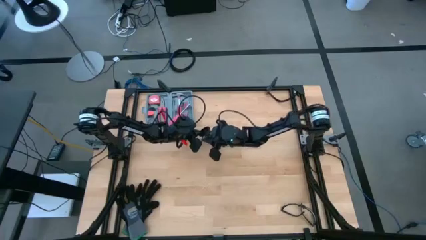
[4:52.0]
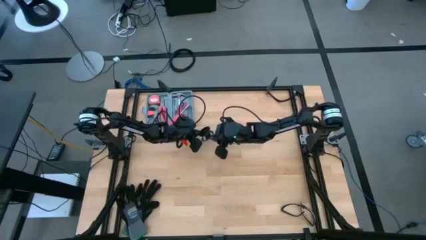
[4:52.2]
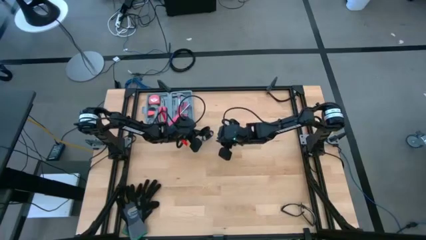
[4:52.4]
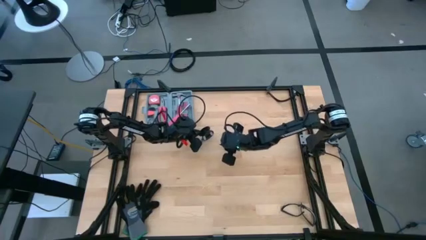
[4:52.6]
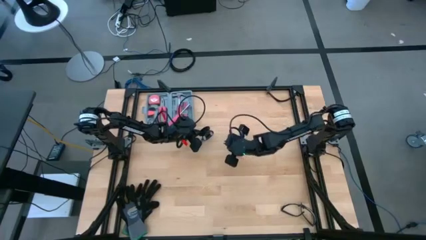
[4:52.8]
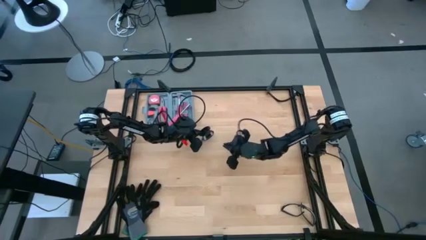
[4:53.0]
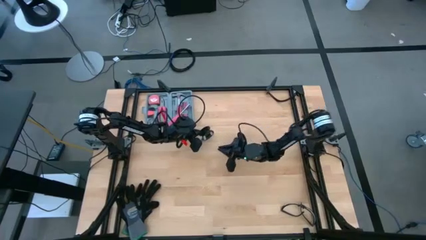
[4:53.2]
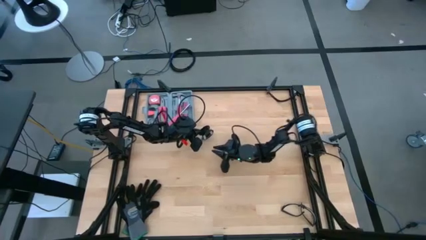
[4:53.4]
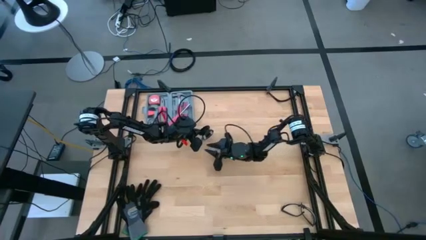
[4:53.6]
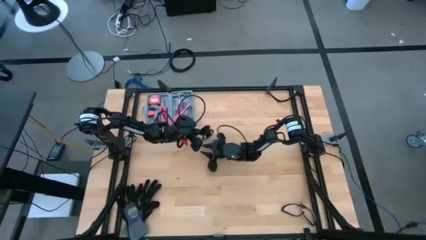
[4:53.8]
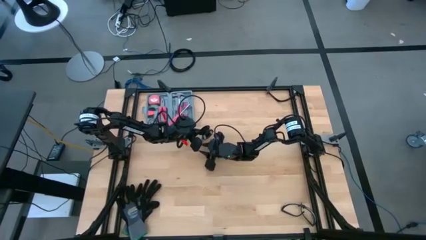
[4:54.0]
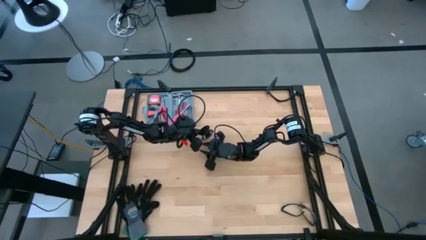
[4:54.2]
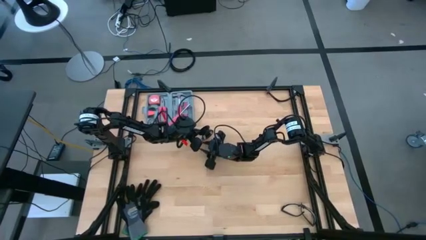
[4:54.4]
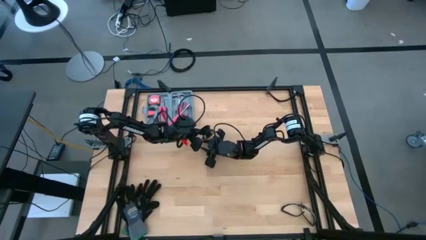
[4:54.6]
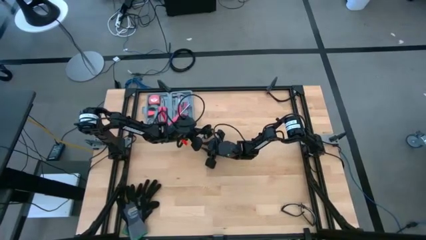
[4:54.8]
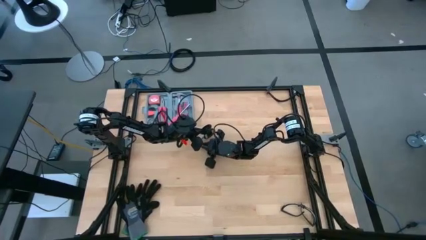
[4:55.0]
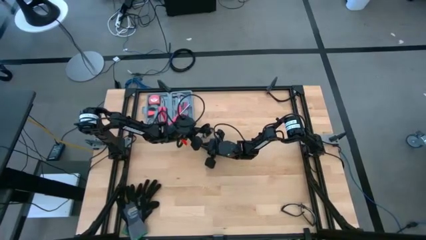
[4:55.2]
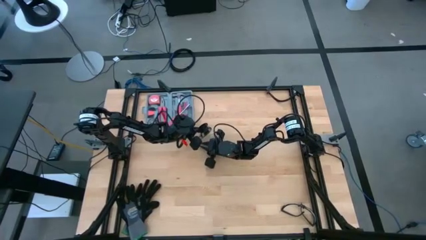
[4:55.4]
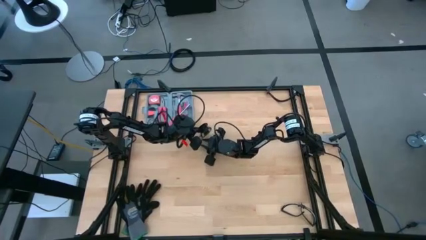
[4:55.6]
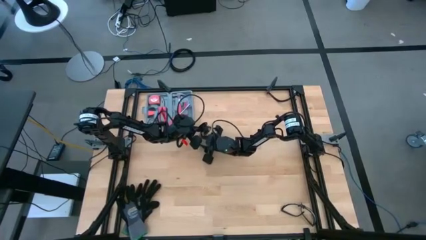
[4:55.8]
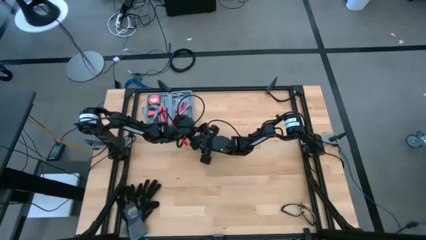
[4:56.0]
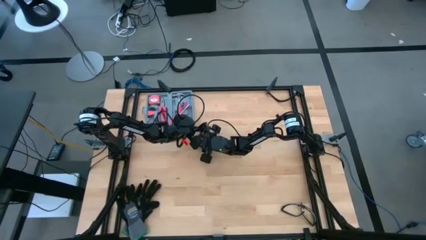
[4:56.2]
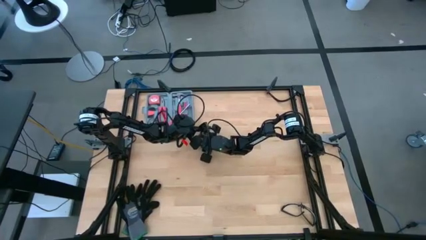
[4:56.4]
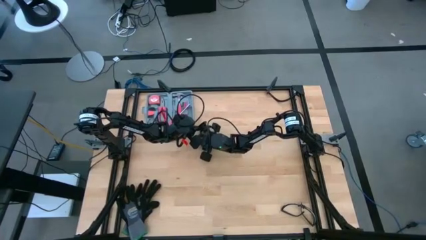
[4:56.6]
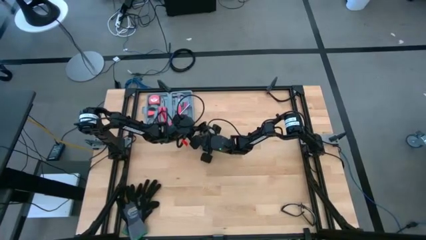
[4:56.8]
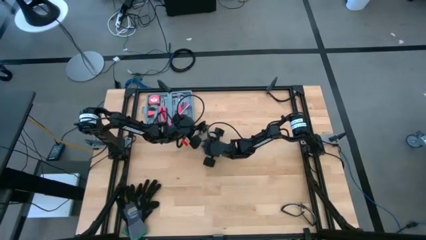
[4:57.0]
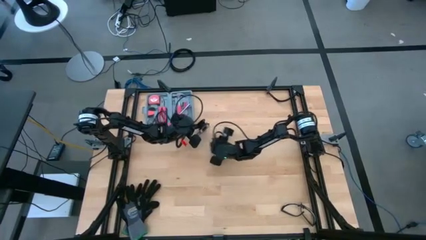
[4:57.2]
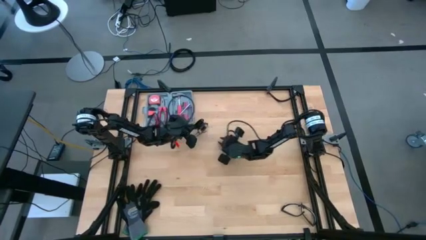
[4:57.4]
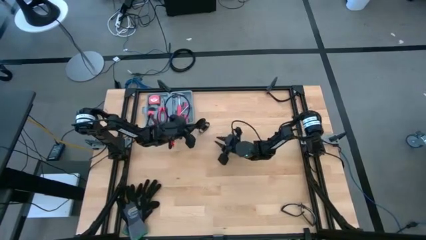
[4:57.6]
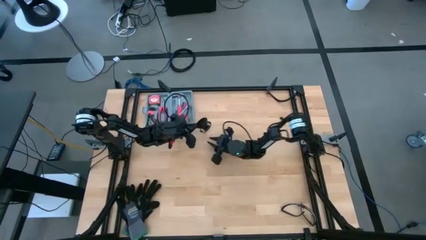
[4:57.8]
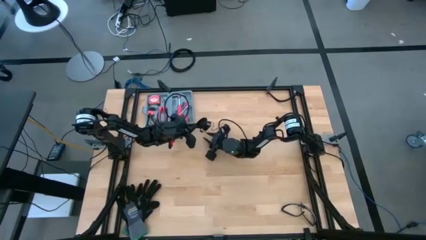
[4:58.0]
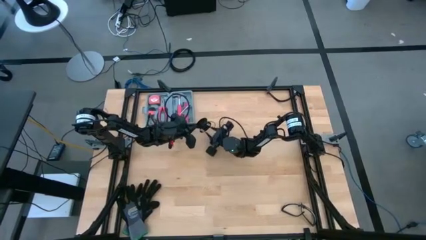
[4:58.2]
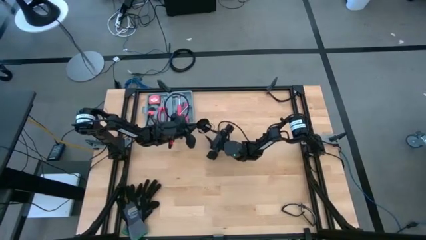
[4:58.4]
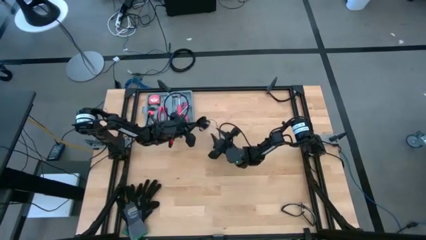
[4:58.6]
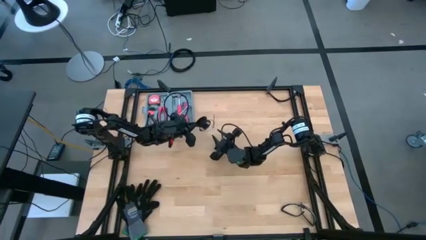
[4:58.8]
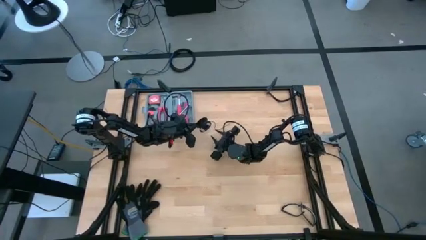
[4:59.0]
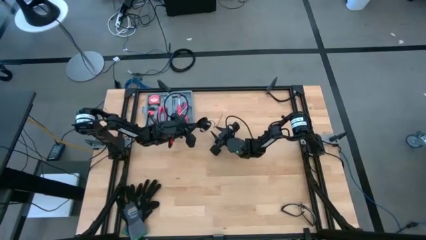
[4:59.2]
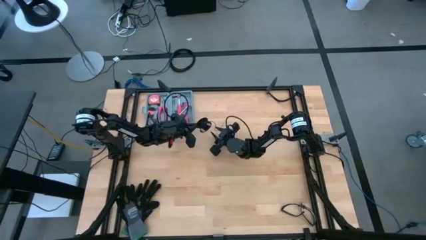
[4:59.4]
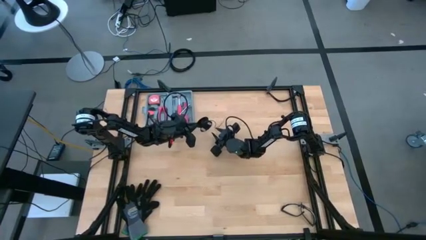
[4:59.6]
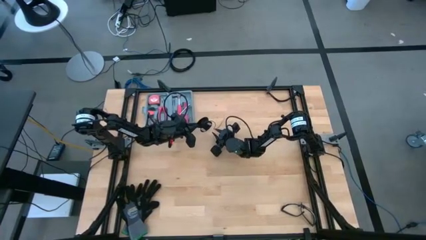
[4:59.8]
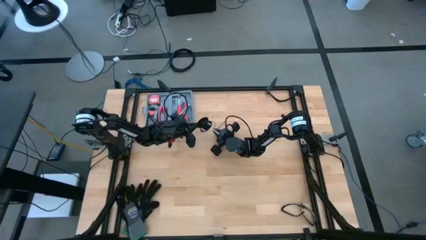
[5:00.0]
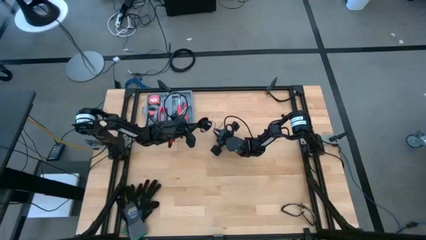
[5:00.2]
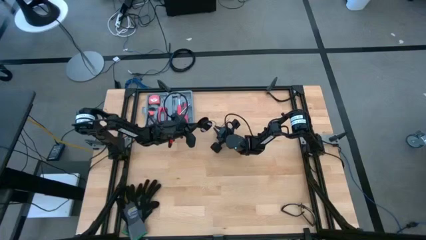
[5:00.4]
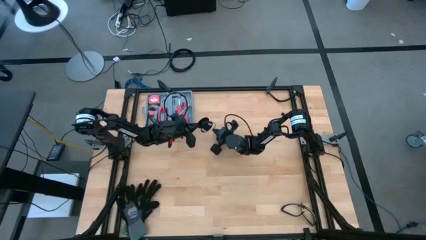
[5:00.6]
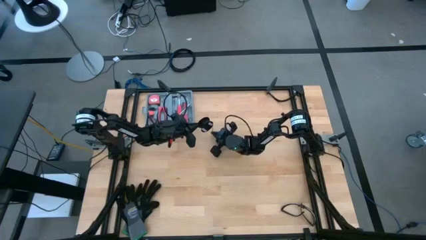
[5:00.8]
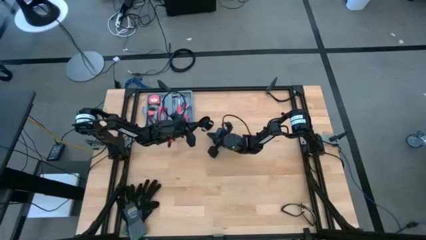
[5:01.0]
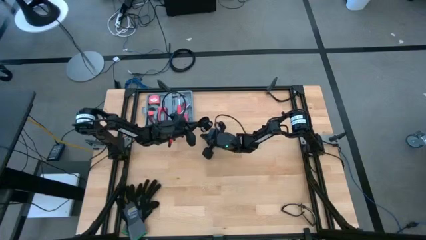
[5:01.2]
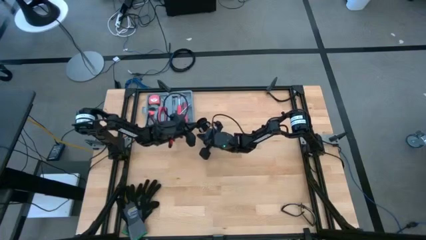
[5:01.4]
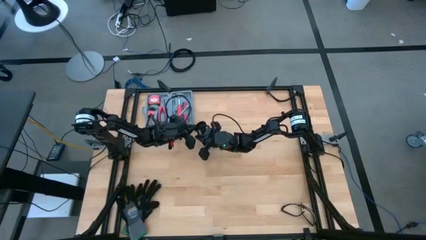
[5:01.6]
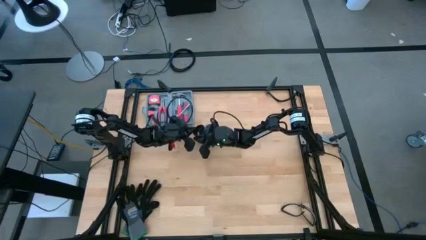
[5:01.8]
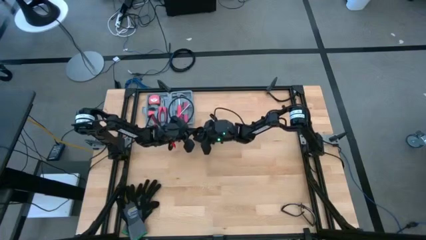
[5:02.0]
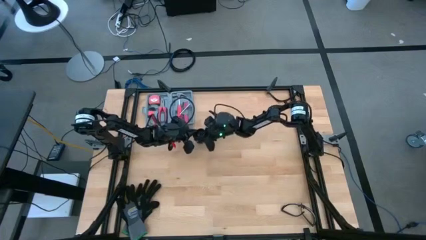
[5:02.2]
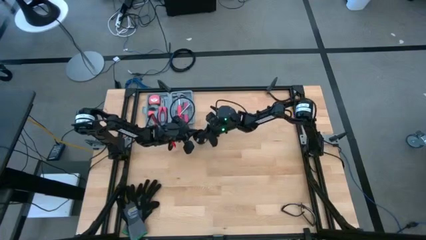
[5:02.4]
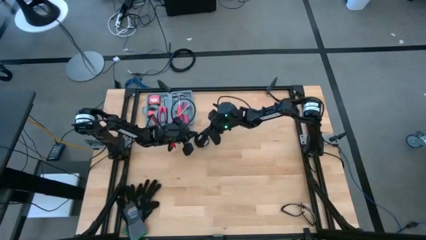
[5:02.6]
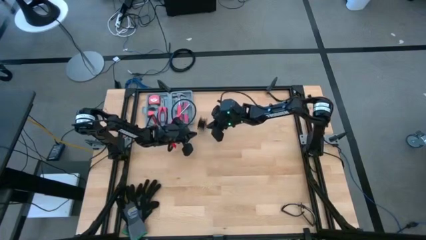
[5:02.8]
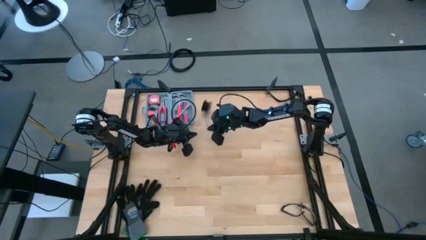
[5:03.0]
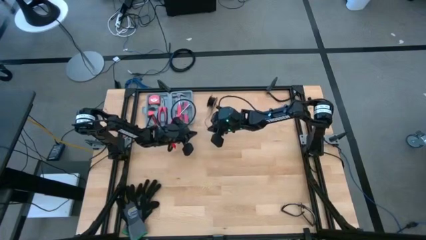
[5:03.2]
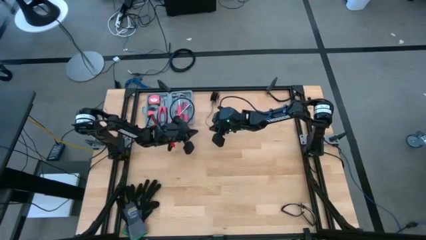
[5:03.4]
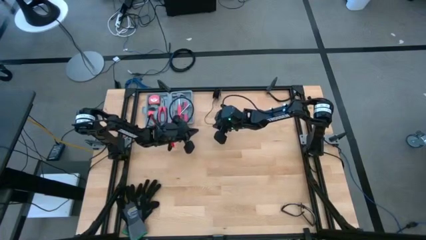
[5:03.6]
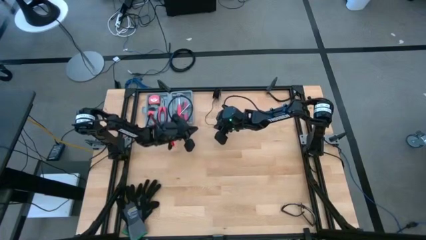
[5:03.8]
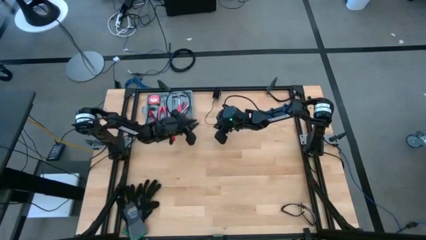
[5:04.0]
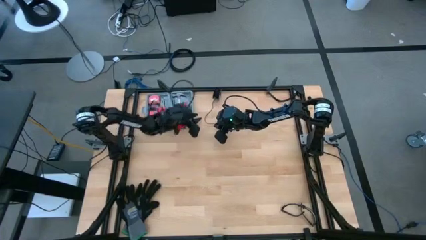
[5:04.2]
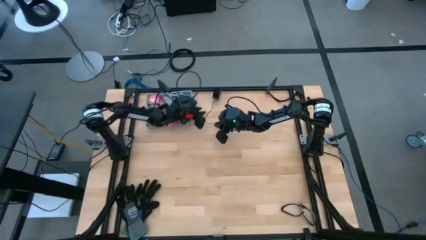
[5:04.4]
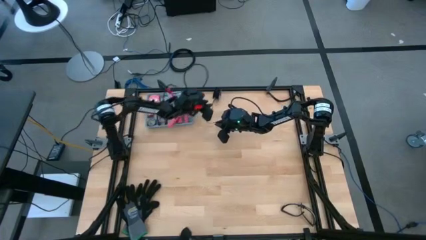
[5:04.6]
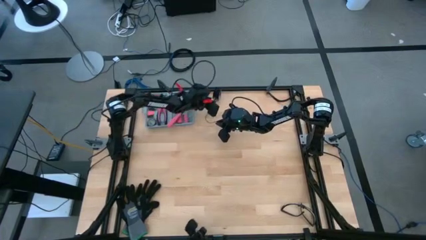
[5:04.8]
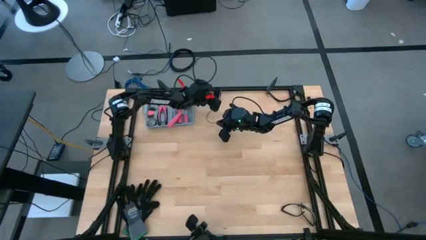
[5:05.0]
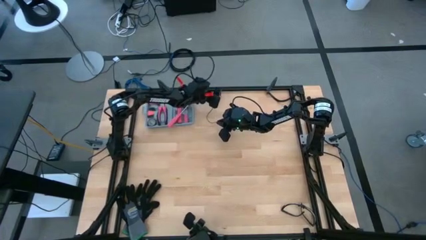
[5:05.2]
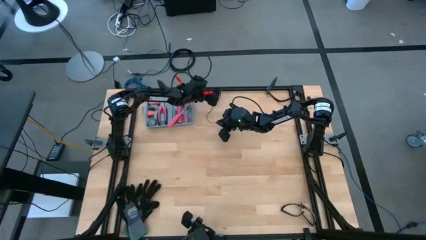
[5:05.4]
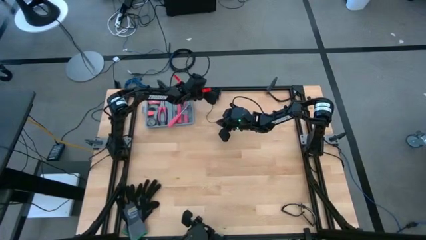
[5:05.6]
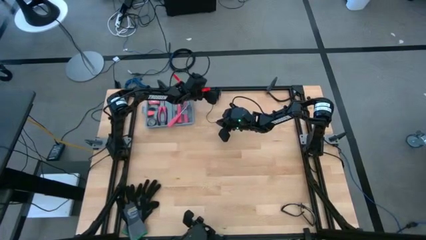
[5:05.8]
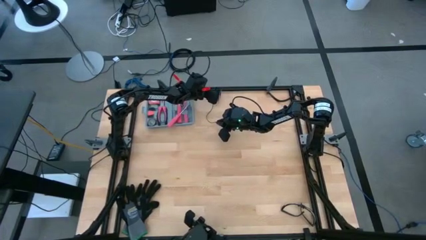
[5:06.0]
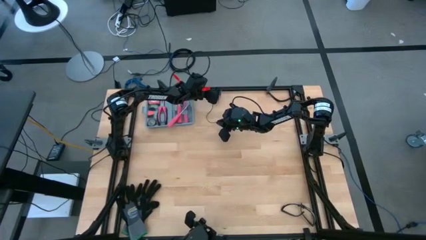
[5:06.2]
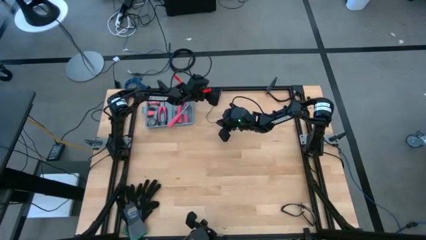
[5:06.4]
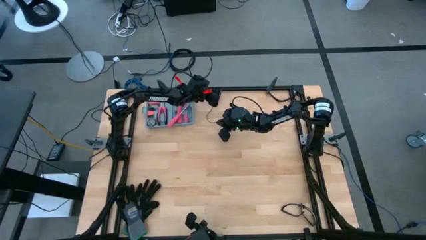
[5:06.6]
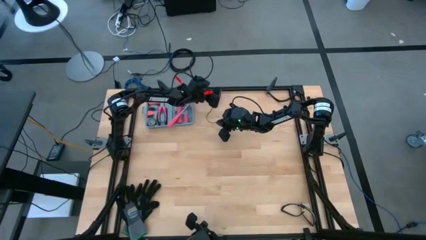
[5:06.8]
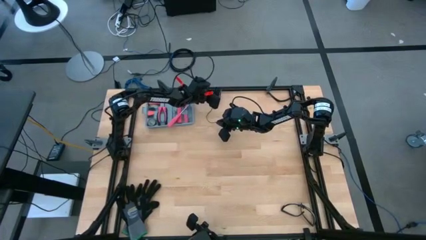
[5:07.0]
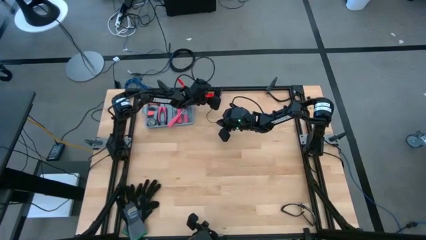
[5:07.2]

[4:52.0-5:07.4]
Task: Coil cords
Coil the black wire onto the spool

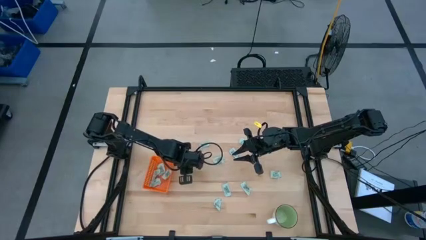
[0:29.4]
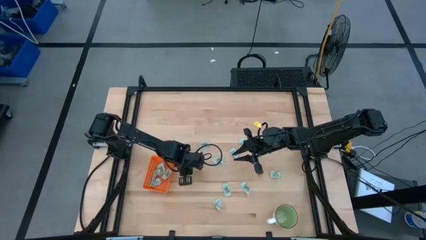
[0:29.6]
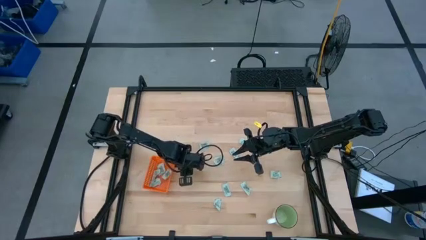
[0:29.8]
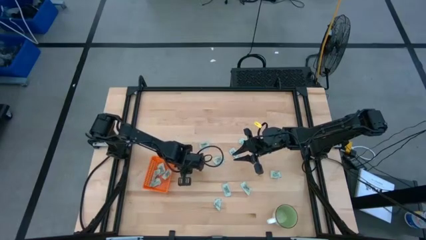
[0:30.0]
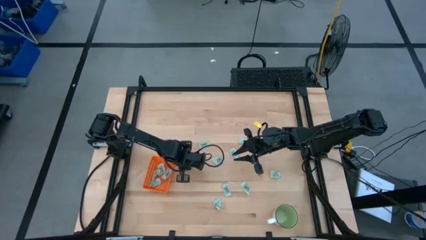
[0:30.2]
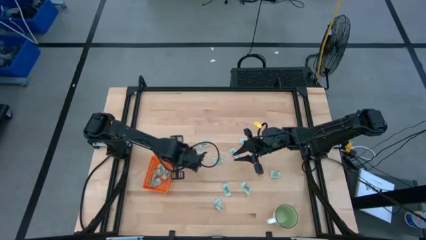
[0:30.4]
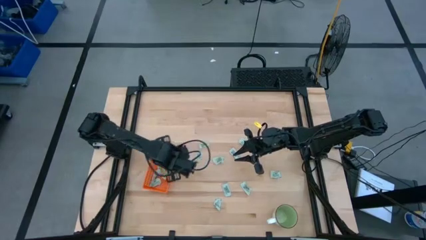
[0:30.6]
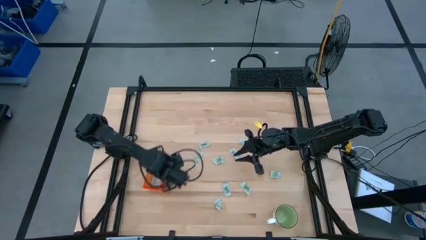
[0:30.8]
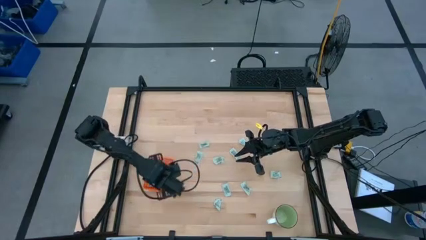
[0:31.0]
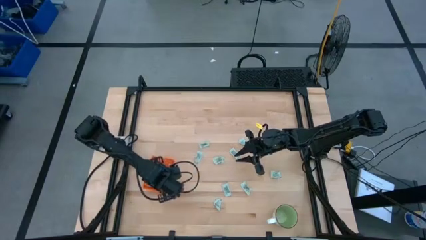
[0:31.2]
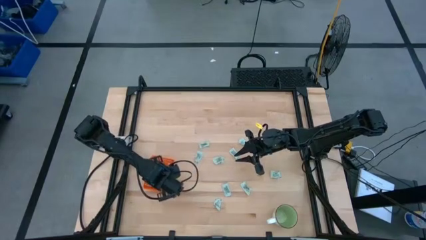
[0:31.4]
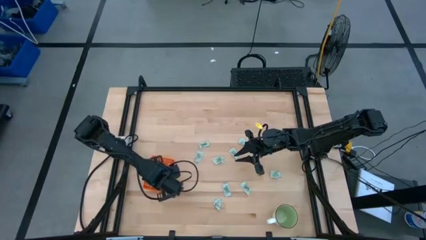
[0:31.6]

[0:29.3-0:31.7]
Task: Pick and place Stevia / Truvia into bins
Put the white stevia packet into the orange bin
